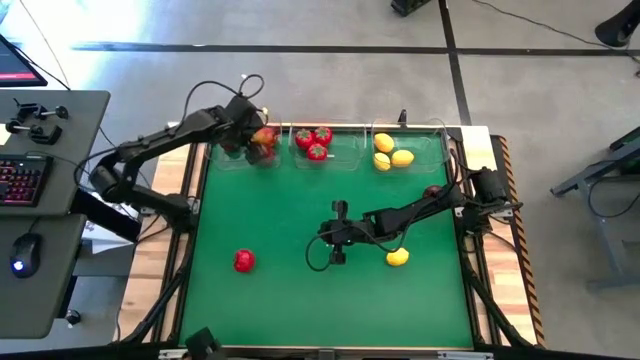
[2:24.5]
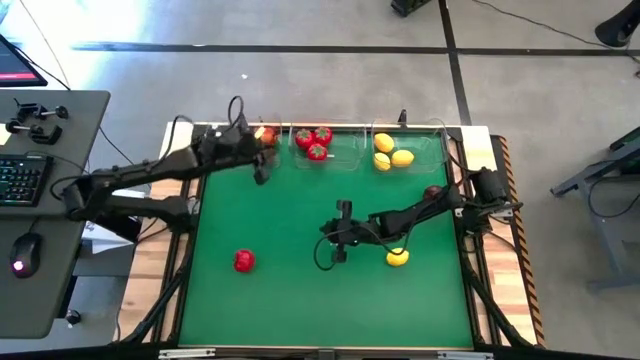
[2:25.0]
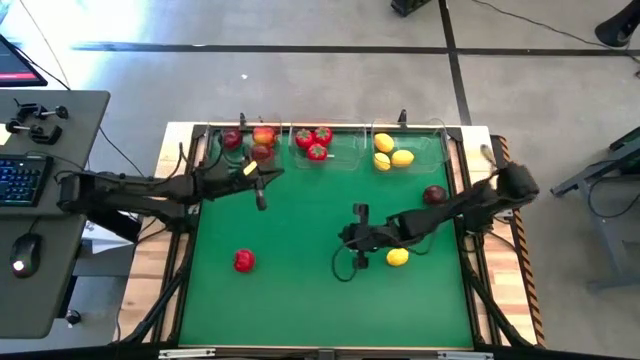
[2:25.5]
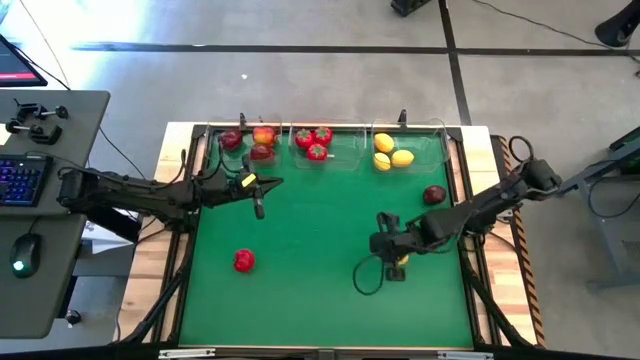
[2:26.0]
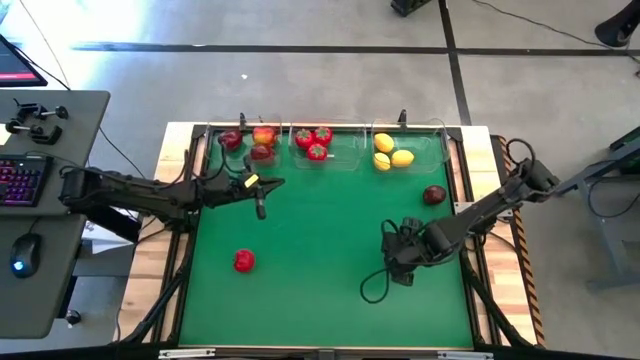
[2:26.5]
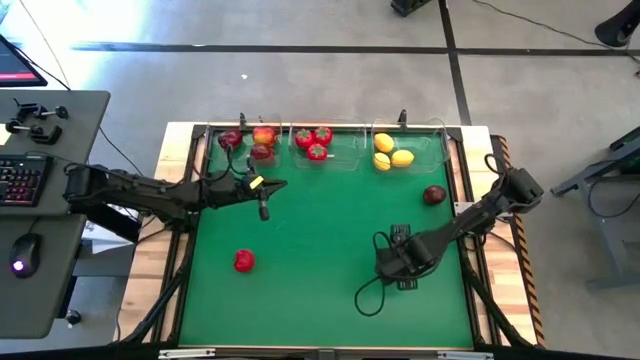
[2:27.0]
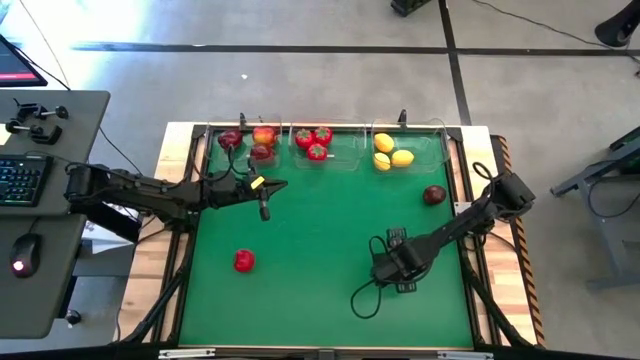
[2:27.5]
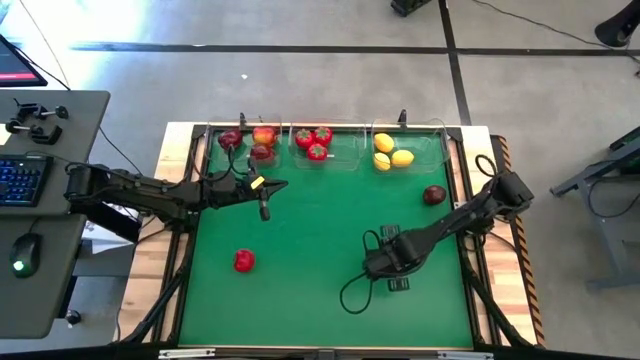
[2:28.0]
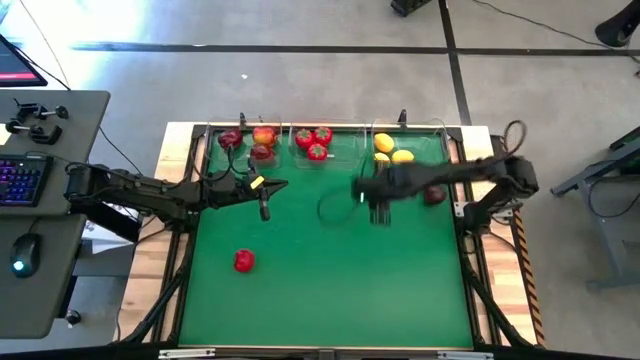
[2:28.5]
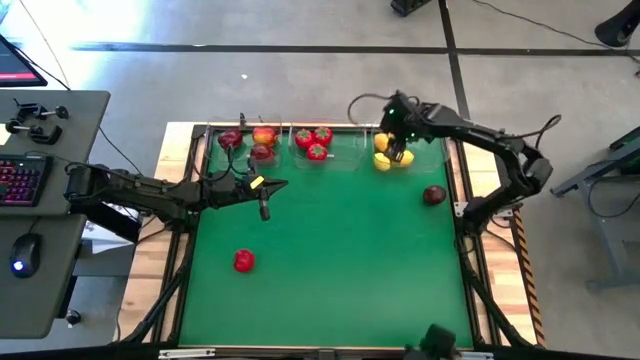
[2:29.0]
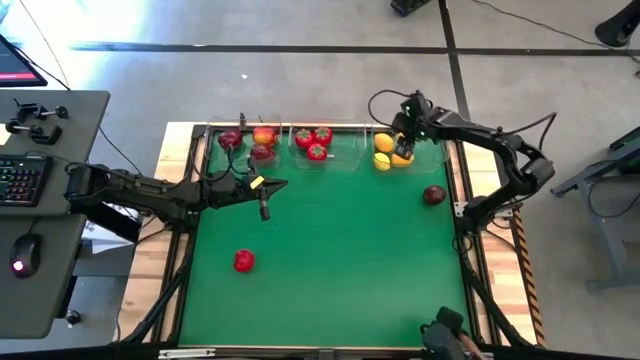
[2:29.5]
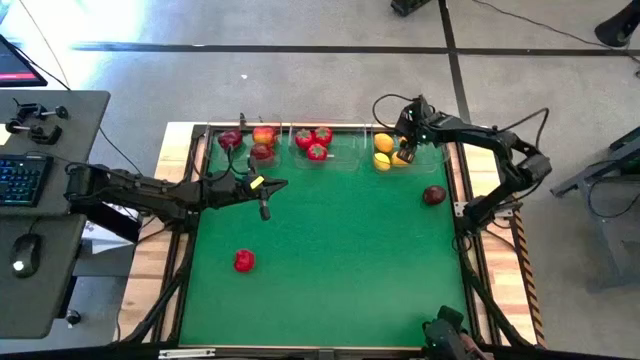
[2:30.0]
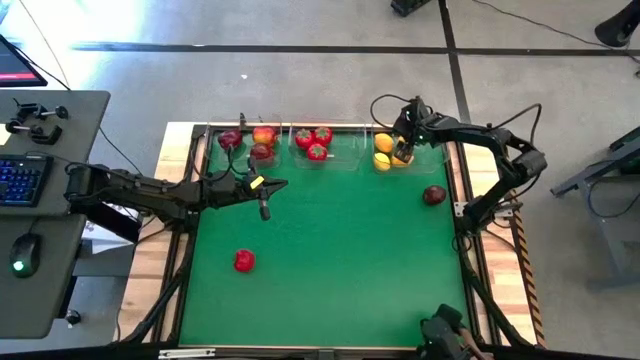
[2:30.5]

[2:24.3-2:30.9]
Task: Sort produce into baskets
Put the lemon into the right transparent bin

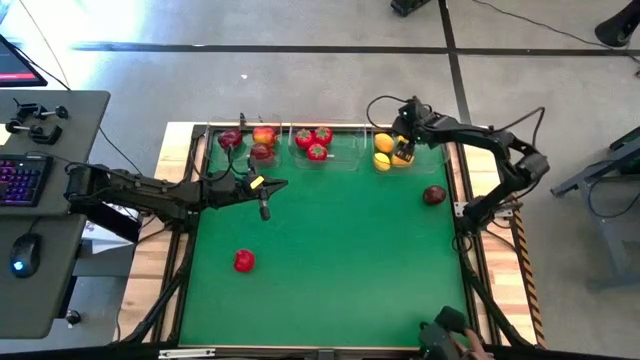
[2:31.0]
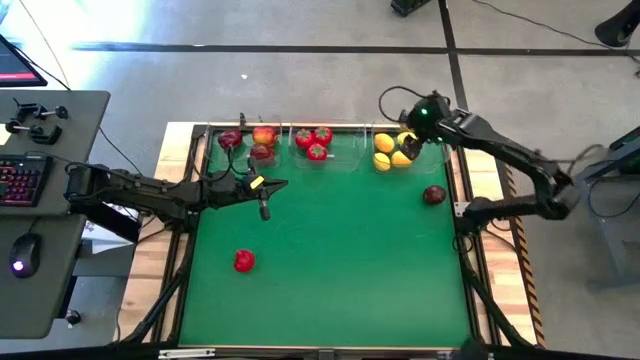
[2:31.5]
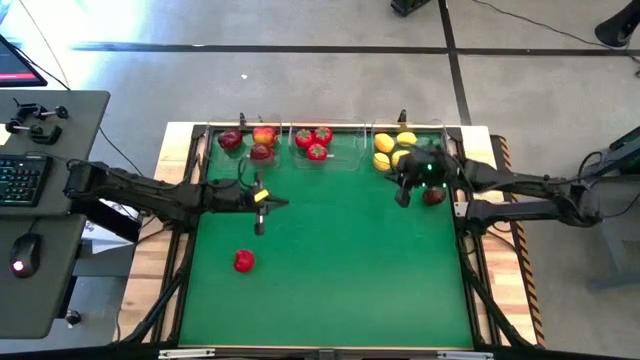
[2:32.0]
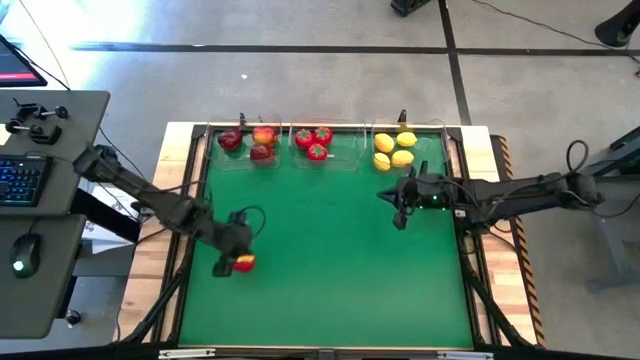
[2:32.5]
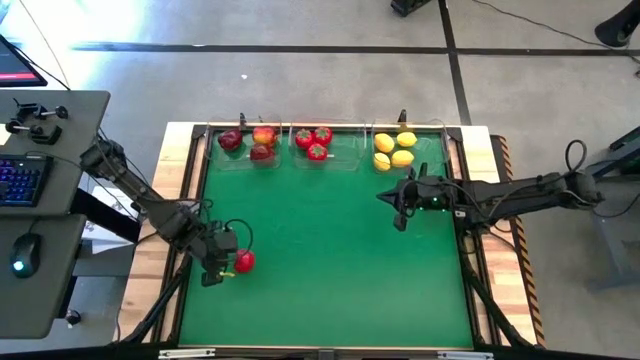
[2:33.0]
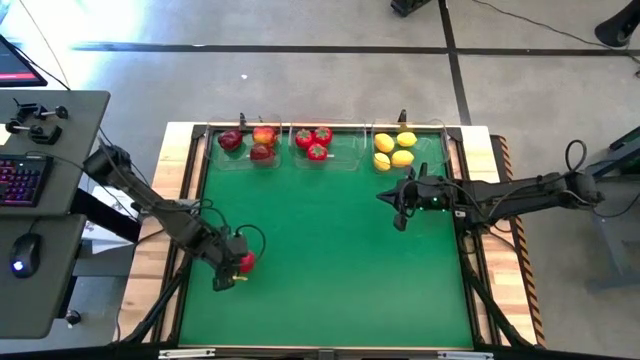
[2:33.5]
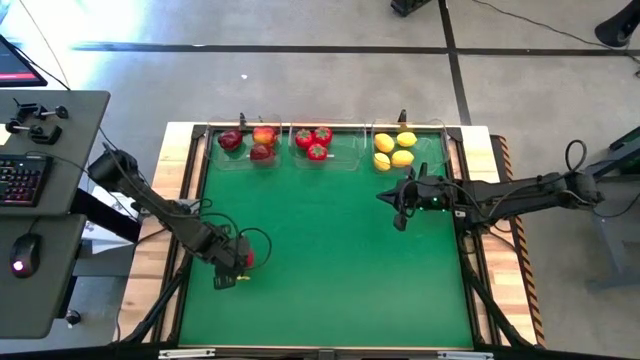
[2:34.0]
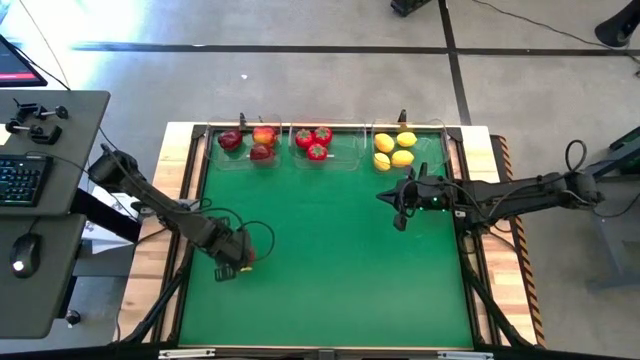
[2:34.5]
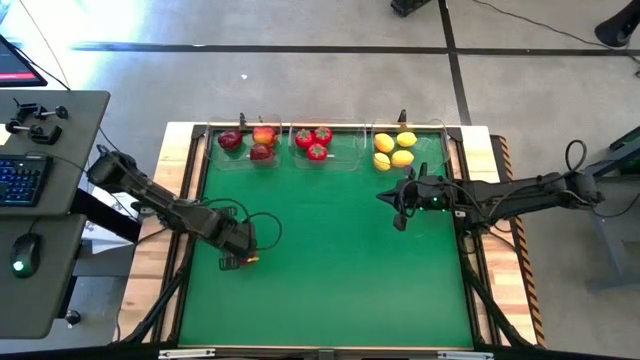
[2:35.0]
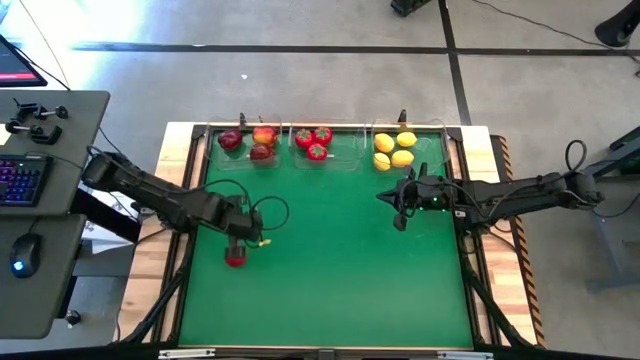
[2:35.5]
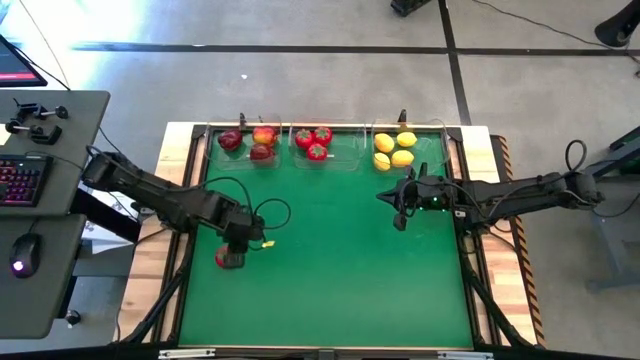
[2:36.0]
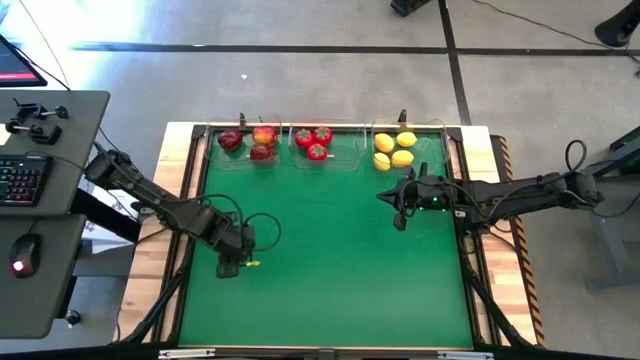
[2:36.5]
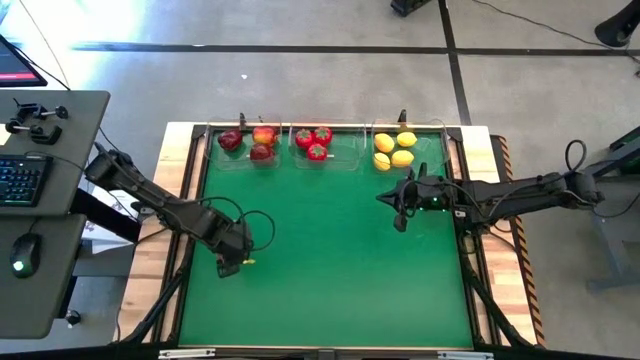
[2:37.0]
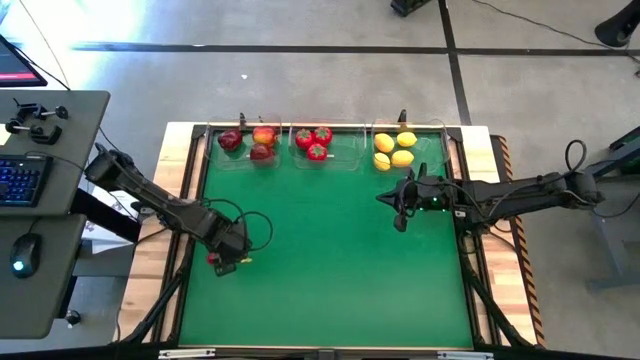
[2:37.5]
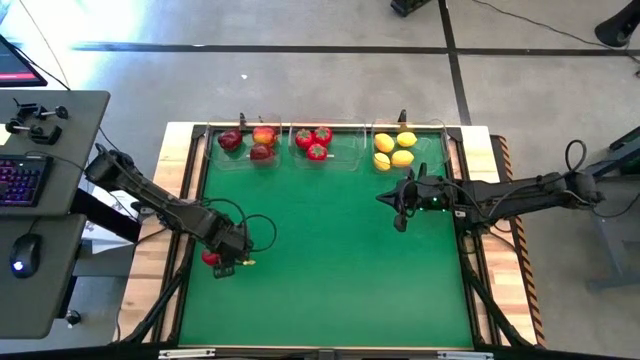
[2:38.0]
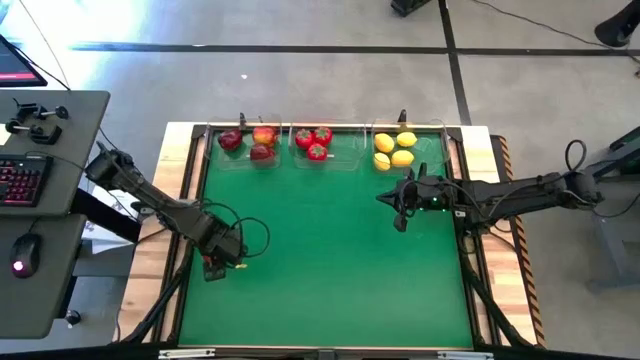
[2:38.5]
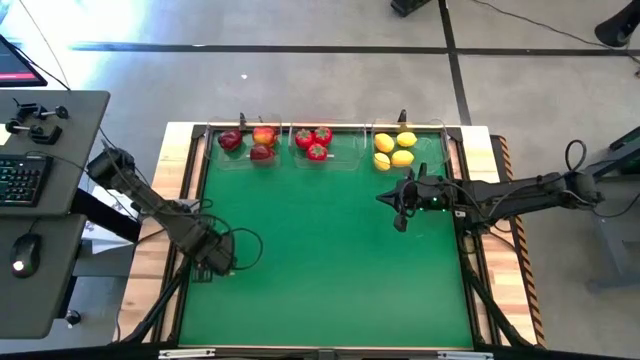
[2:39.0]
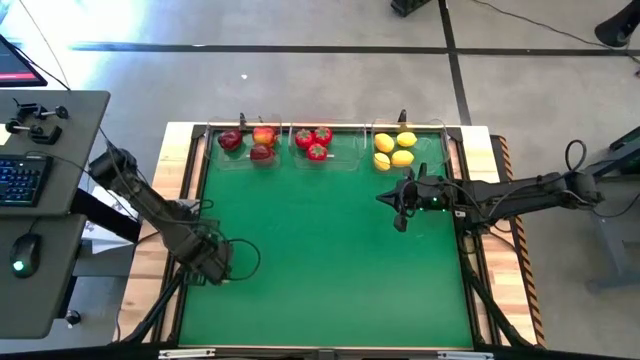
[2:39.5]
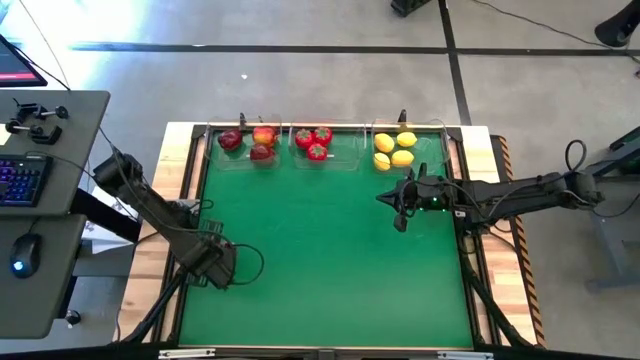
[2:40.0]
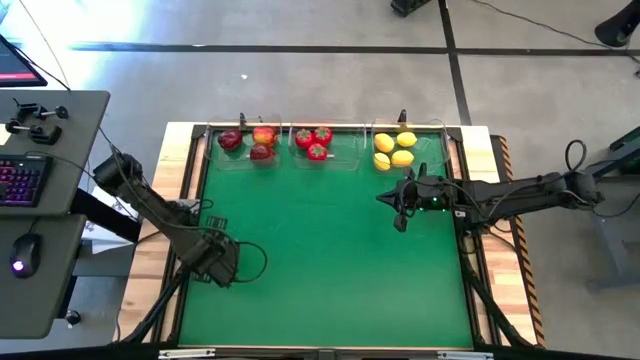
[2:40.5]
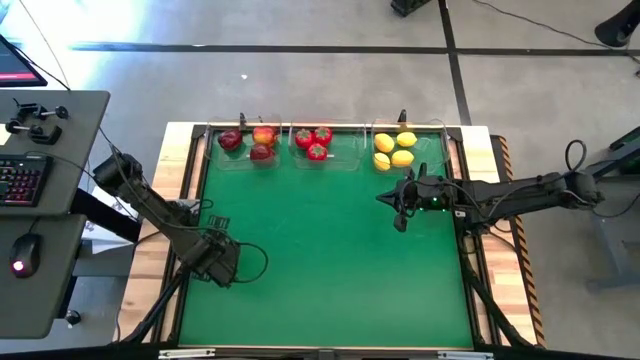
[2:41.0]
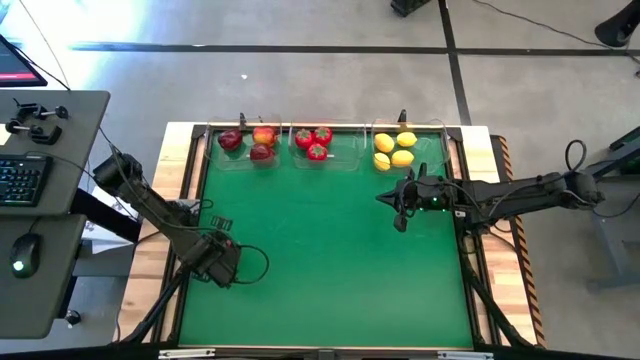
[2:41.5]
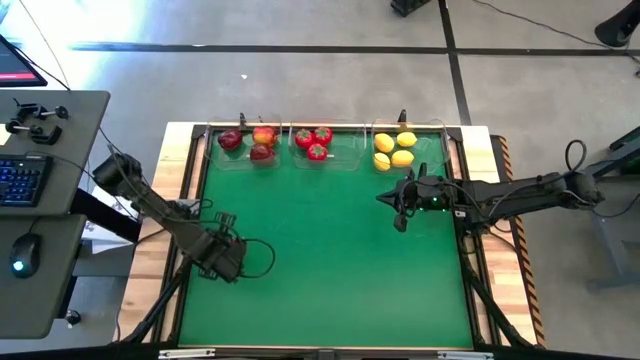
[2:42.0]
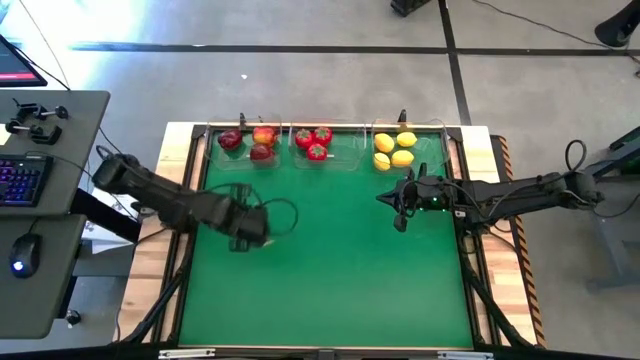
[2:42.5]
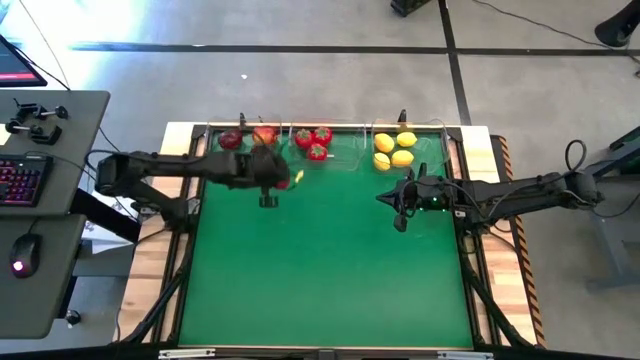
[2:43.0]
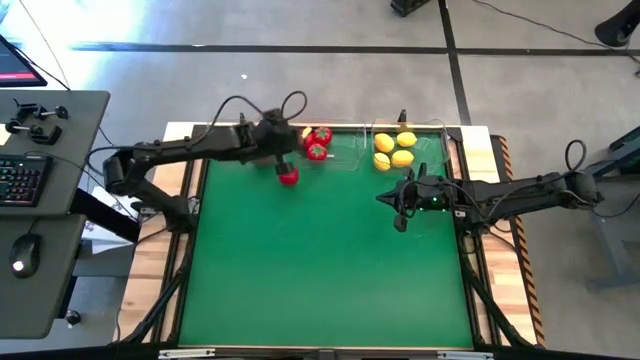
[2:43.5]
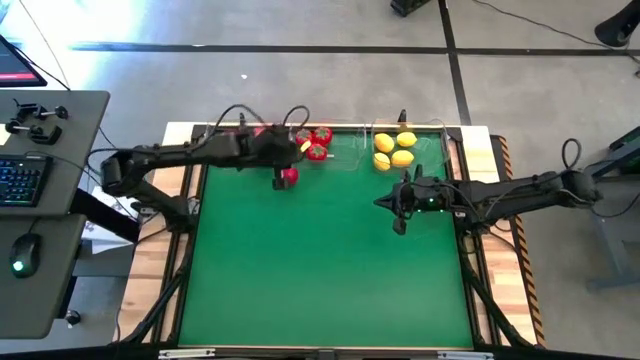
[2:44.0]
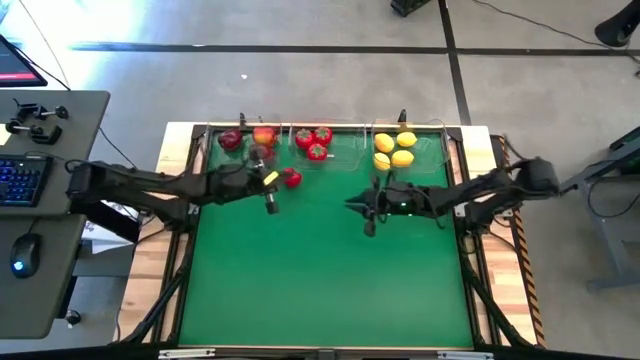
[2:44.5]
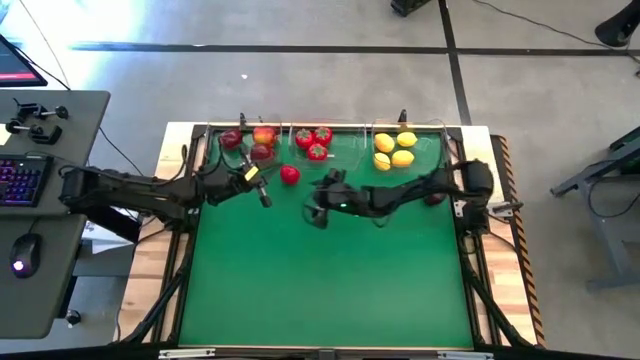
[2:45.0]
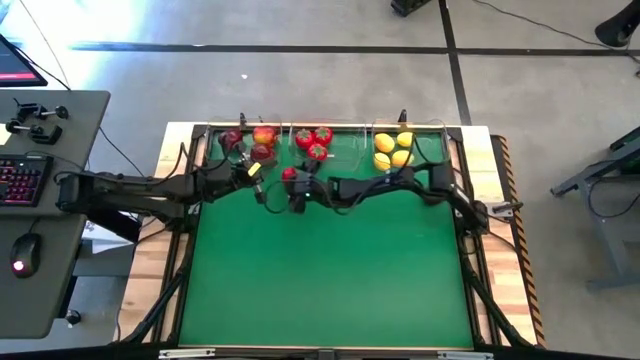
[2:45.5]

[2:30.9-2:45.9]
Put the tomato into the middle transparent bin

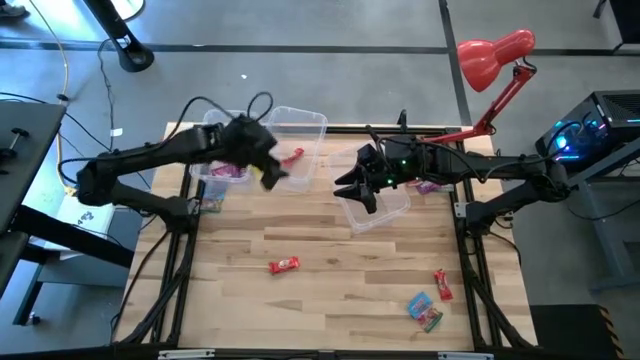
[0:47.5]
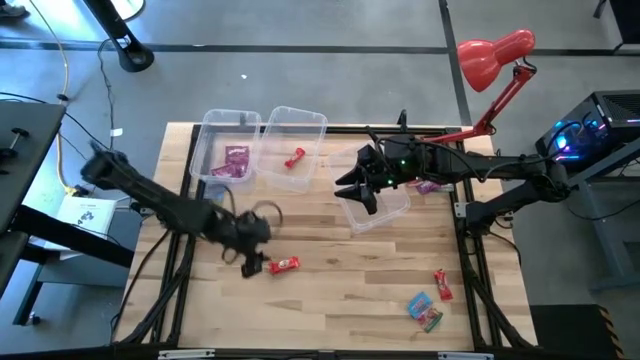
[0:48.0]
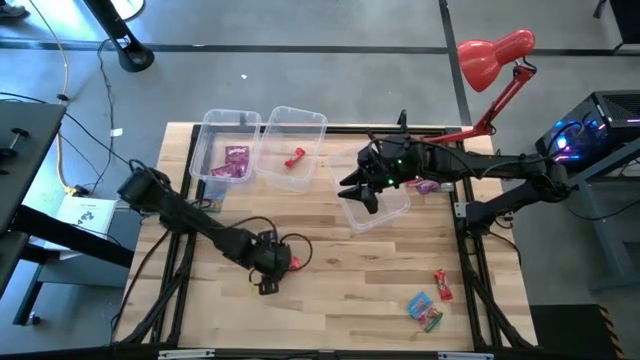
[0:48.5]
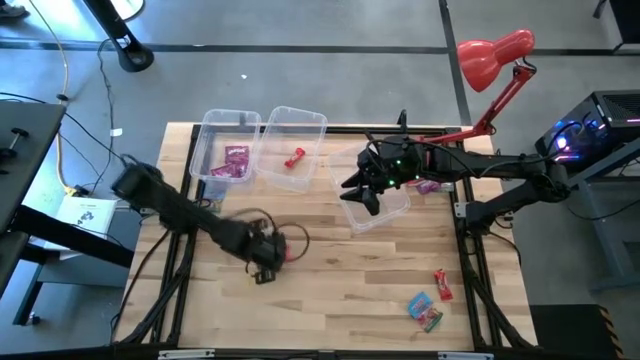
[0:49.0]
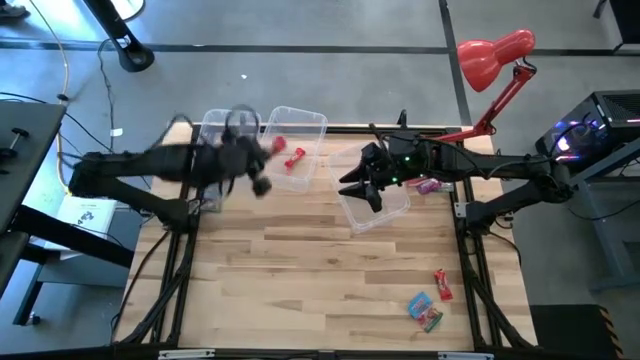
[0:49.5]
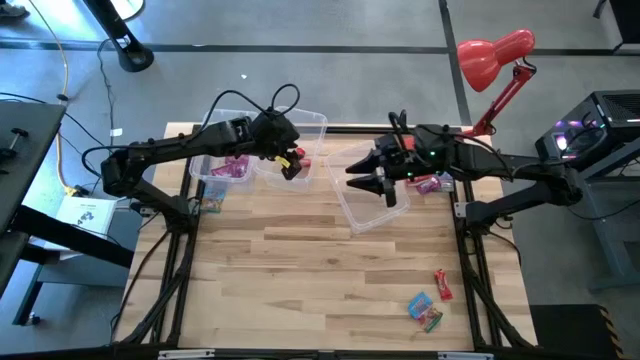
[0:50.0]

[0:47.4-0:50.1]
Task: Sort candy
Put the red candy bag into the center transparent bin
